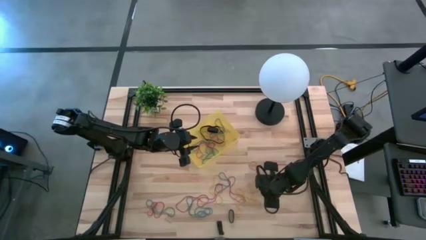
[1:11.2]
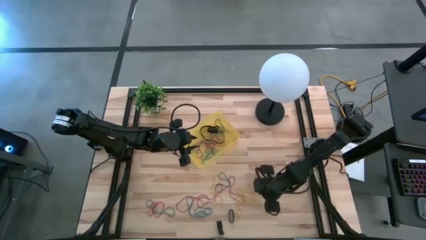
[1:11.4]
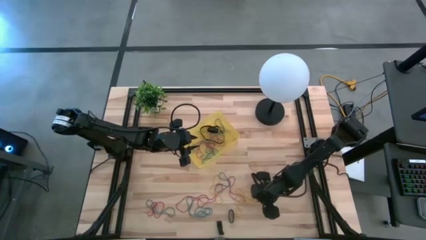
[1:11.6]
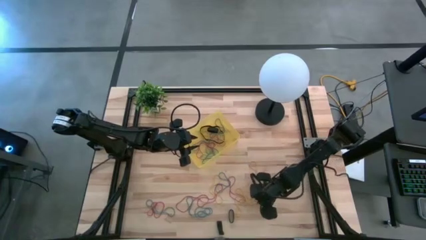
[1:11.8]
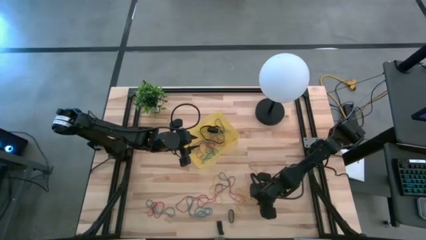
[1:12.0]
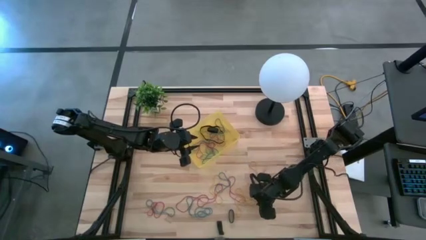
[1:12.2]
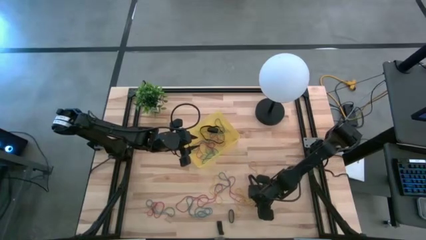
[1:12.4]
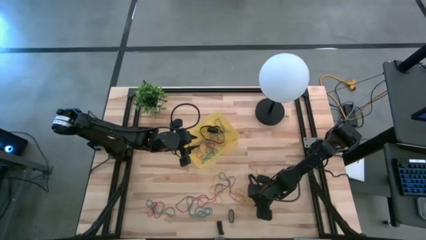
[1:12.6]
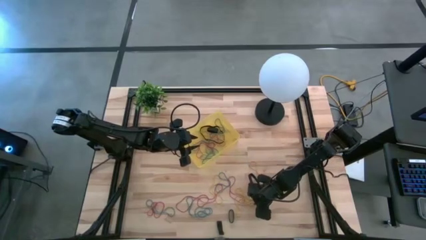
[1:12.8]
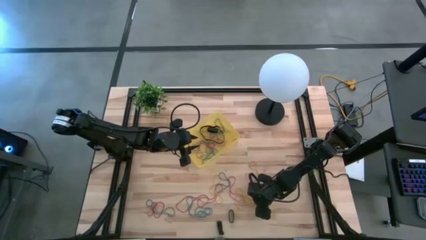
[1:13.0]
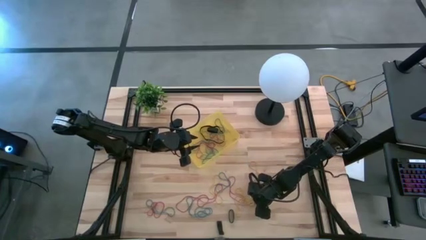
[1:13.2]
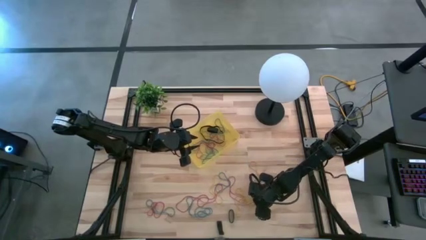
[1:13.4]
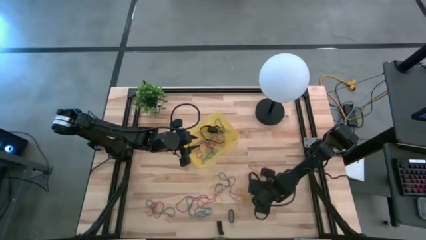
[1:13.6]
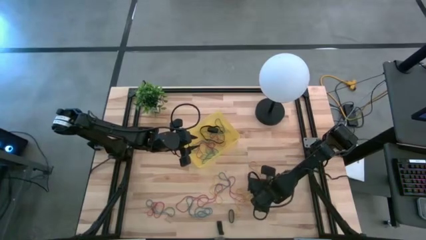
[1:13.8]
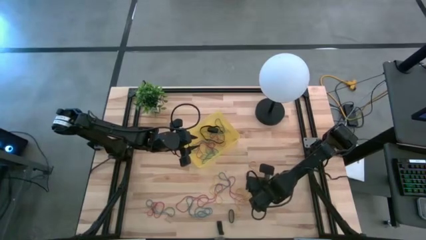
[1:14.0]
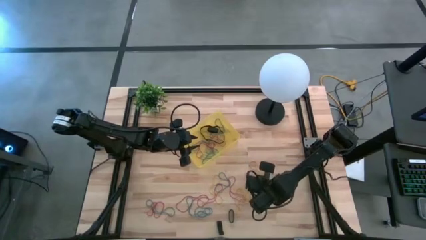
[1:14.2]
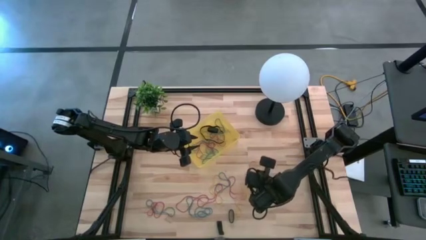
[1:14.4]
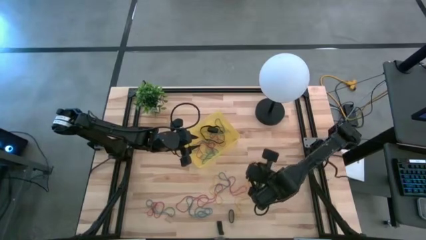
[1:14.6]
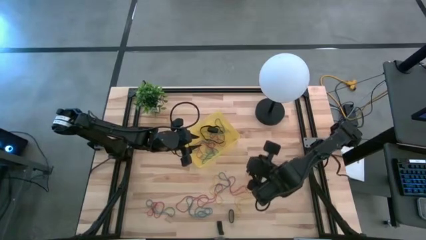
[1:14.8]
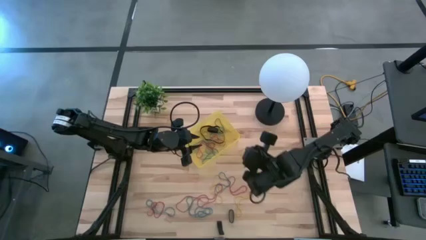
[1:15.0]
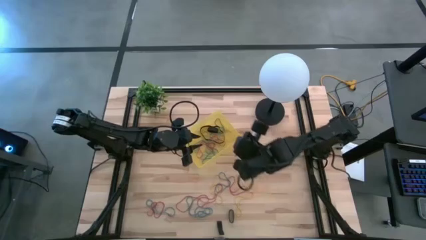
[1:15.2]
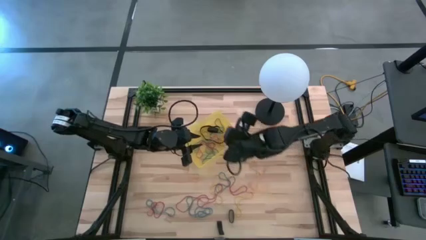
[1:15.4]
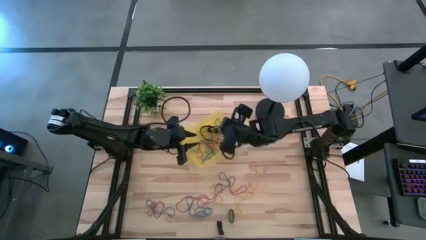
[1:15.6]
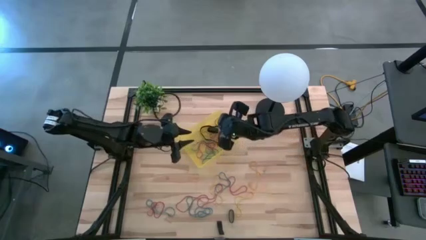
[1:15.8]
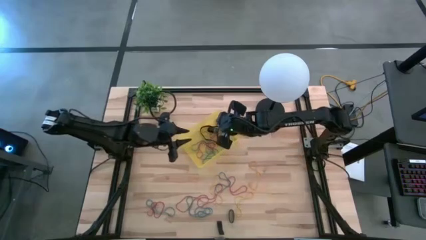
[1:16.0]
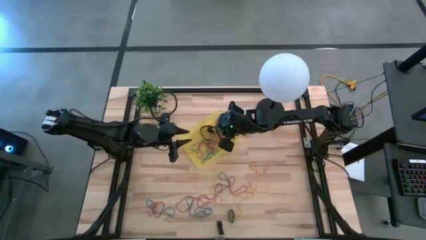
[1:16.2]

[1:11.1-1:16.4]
Task: Pick and place rubber bands into bin
Put the yellow rubber band into the yellow bin

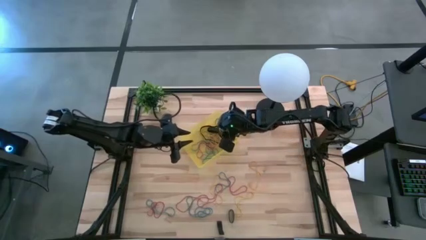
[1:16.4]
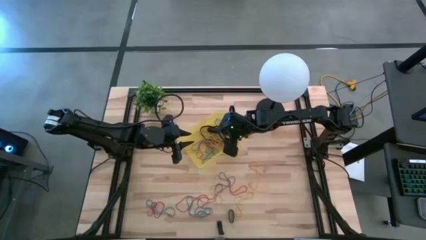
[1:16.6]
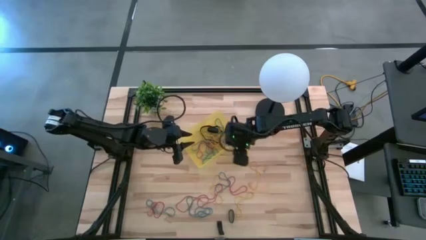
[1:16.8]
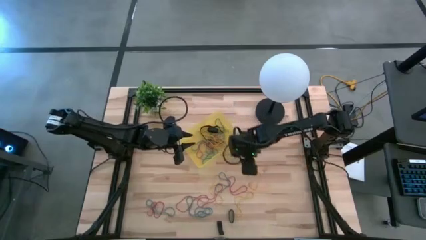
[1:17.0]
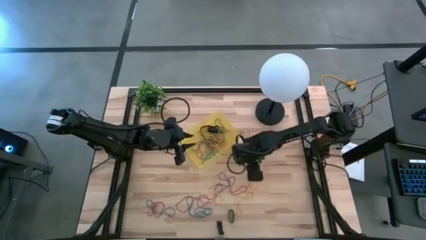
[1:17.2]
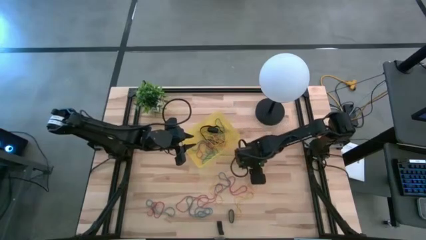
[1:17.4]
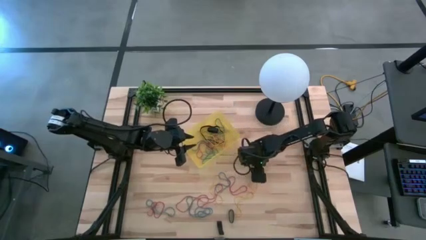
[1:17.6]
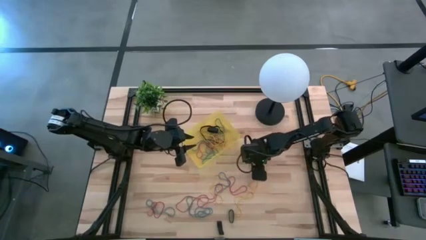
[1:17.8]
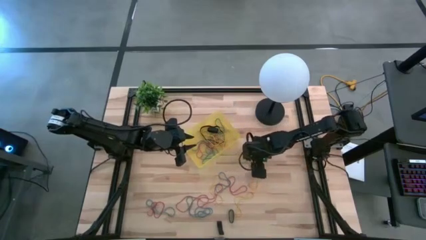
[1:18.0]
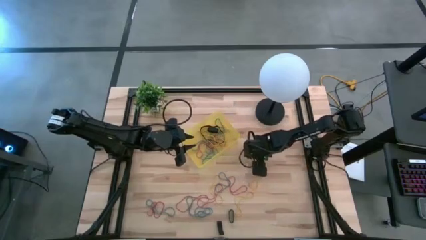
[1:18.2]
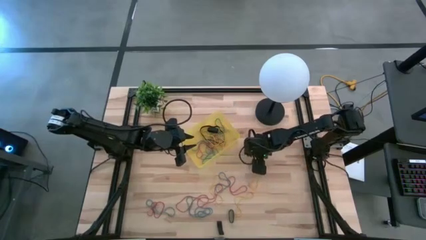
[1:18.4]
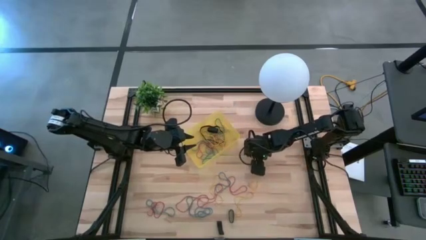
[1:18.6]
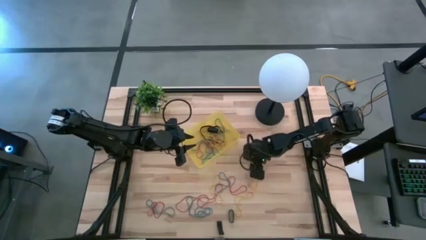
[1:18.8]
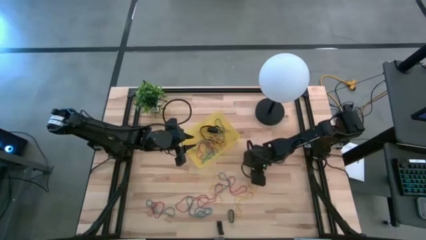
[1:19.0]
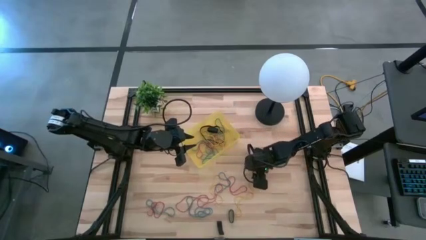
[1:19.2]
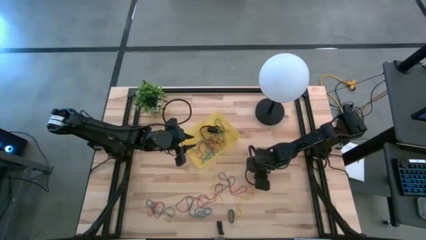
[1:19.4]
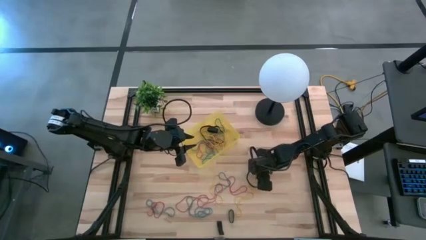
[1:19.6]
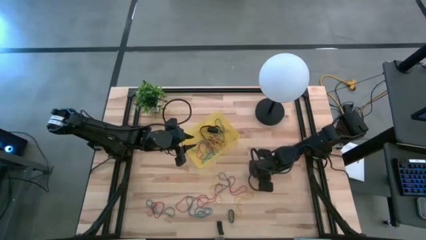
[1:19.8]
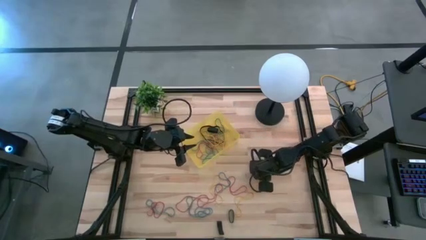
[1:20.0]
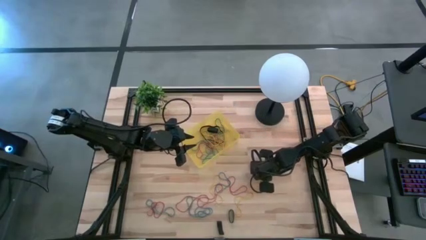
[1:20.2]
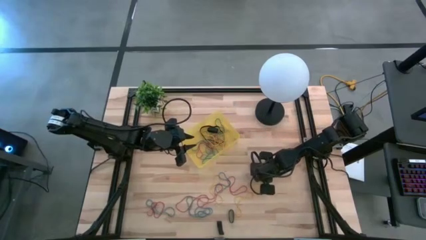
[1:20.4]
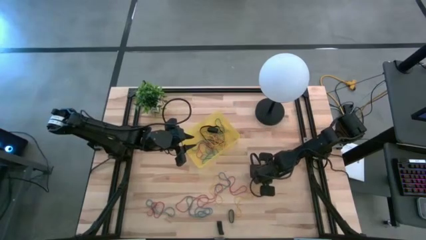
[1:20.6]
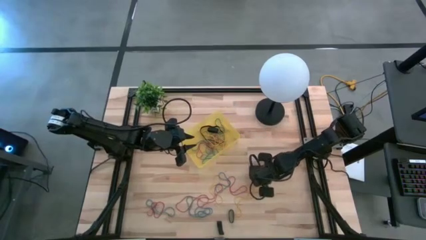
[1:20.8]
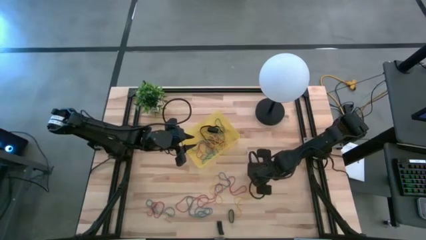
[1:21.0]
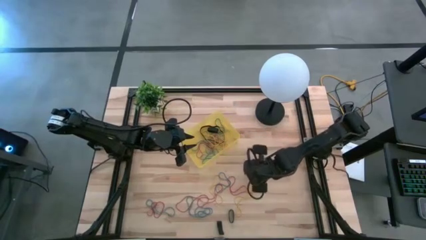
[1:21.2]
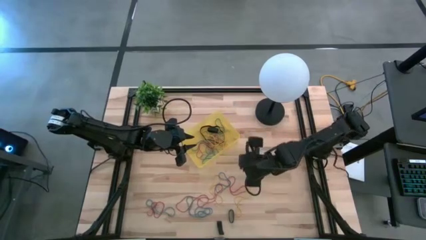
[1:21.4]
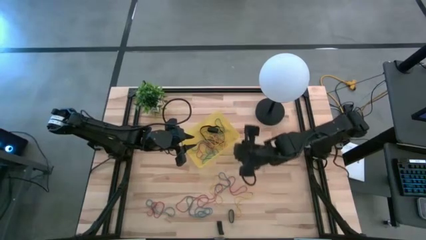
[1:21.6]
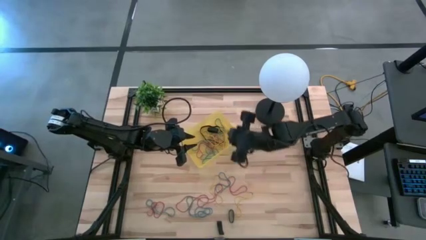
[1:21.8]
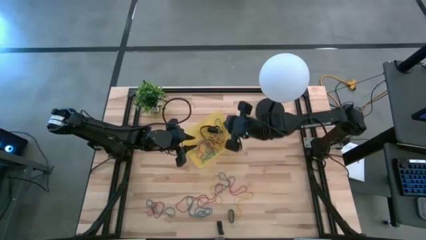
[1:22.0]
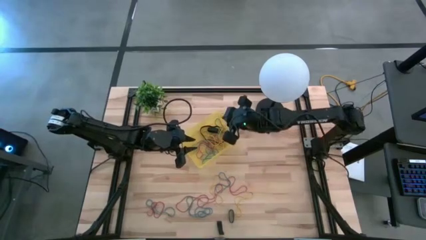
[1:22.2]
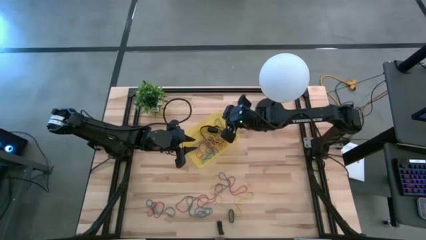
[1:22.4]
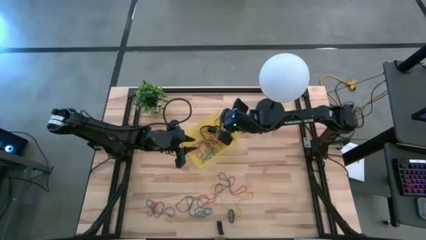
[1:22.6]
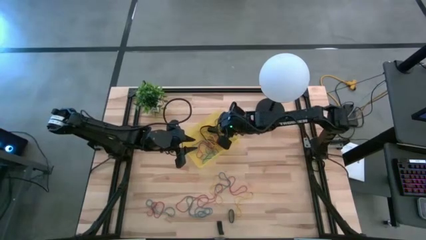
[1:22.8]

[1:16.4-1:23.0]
Put the yellow rubber band into the yellow bin

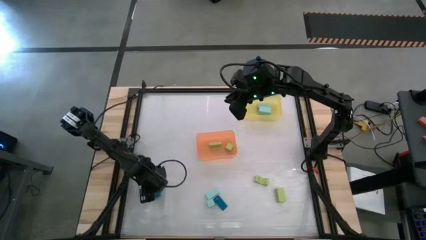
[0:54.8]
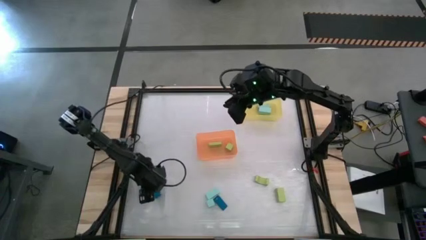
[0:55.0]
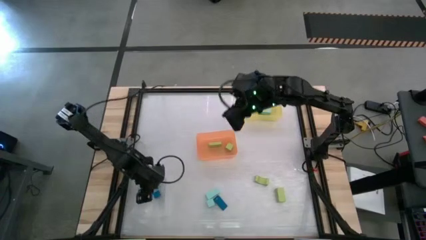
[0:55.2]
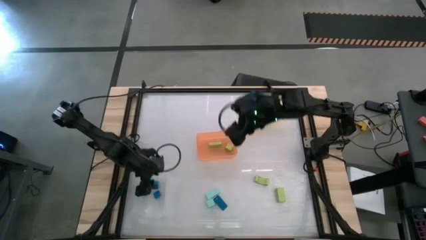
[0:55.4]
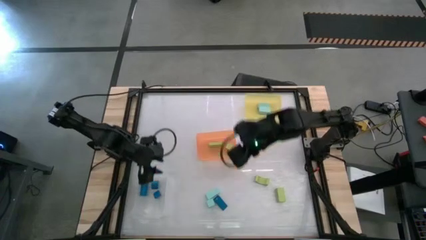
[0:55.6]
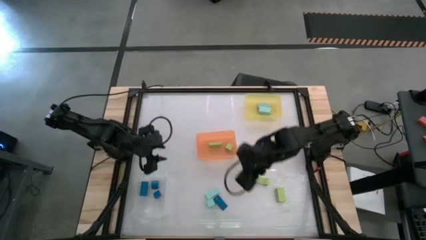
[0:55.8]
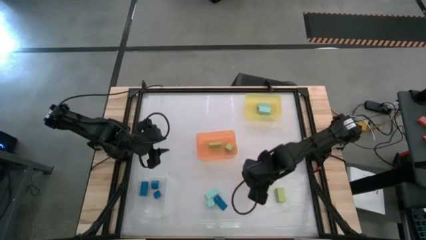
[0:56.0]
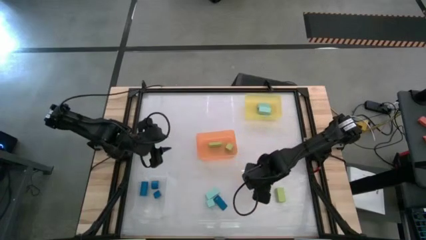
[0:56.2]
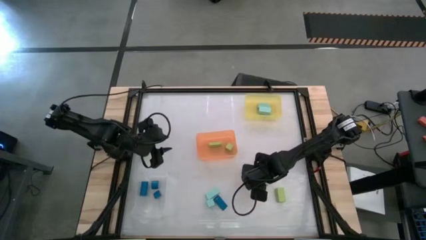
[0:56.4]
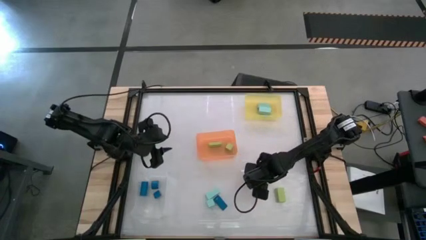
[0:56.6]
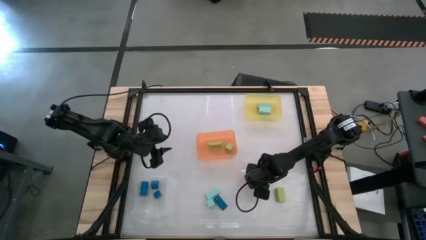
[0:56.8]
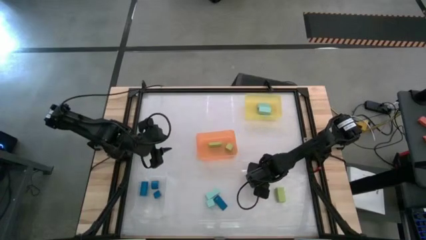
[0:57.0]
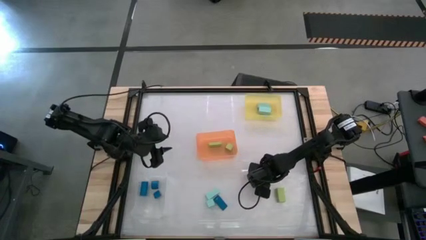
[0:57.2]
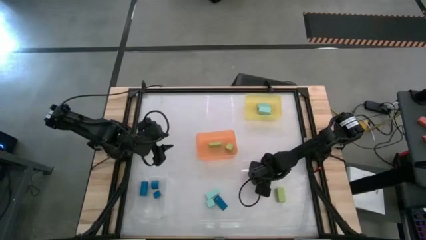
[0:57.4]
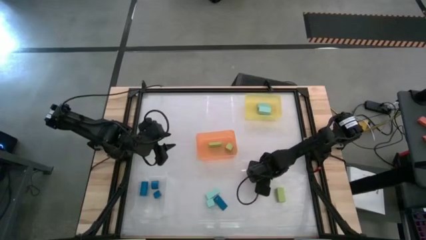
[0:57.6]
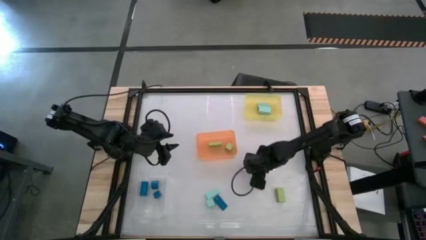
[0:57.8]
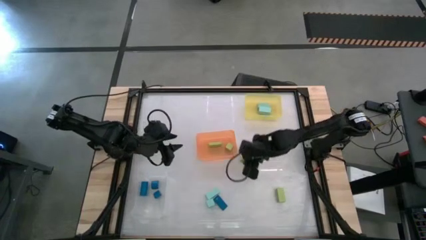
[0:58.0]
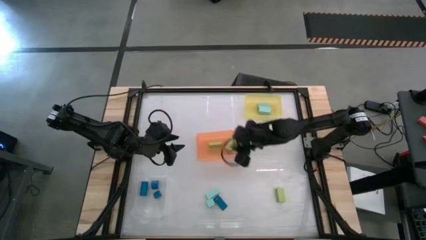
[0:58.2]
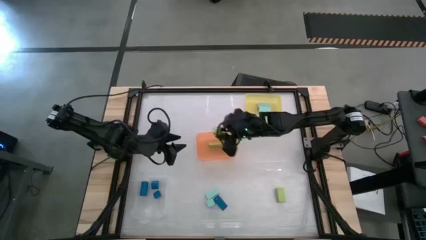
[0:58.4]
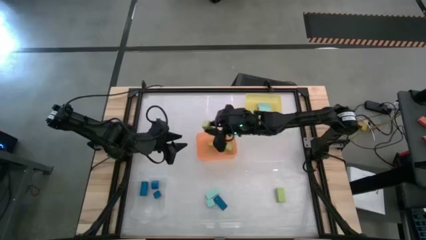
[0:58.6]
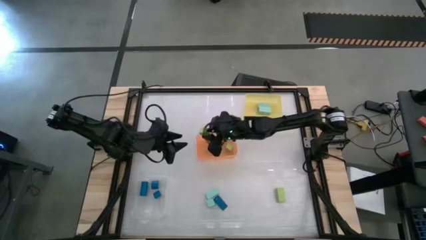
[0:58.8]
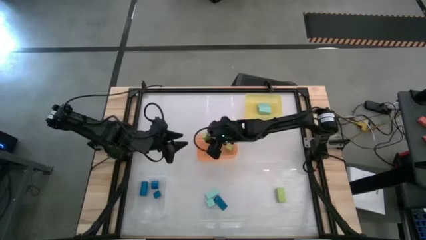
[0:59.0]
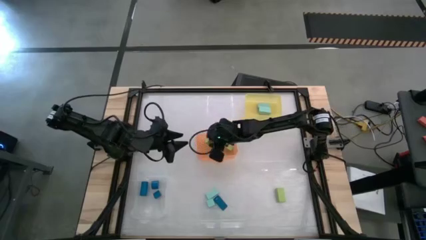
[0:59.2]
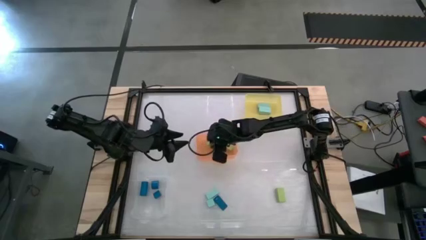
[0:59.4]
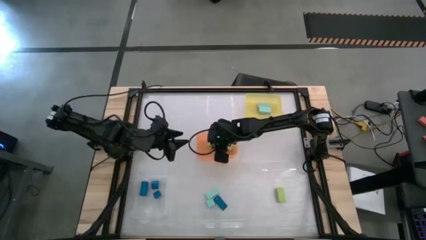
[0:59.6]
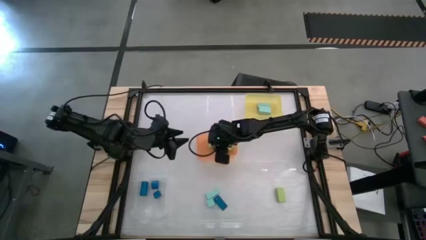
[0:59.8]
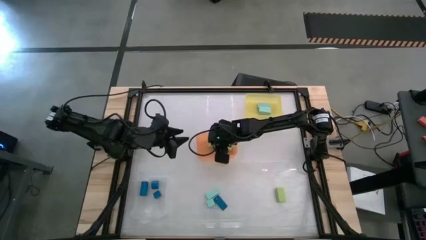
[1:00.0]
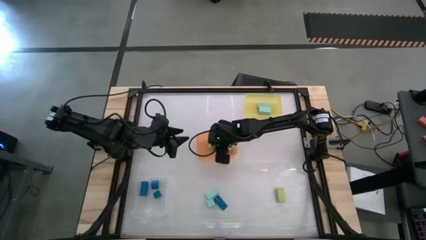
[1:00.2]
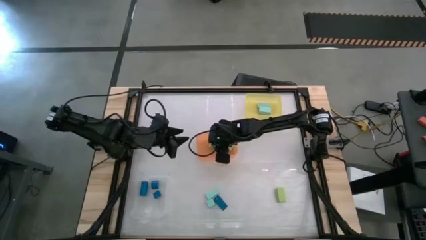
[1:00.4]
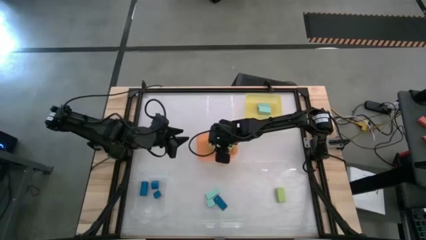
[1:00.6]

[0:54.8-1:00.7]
Task: Sort & place blocks by color
Put the light green block into the orange bin
